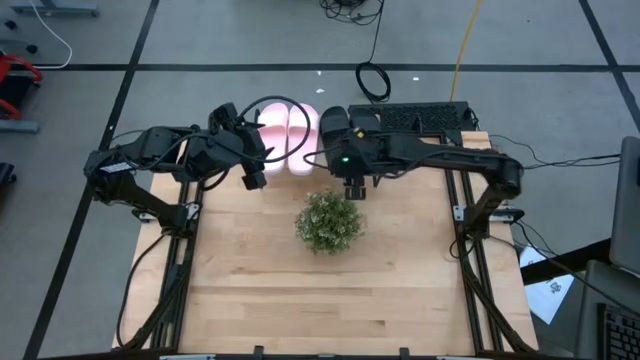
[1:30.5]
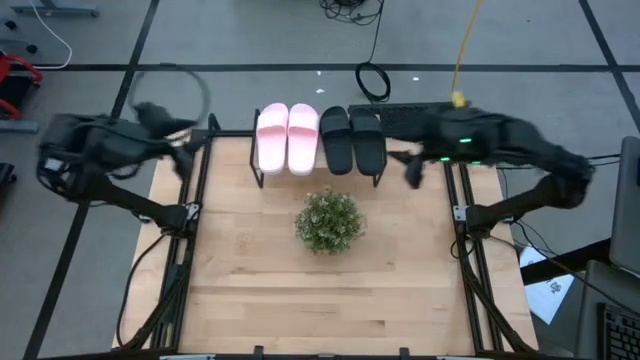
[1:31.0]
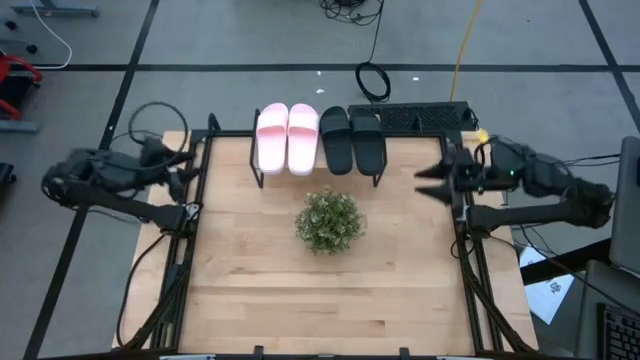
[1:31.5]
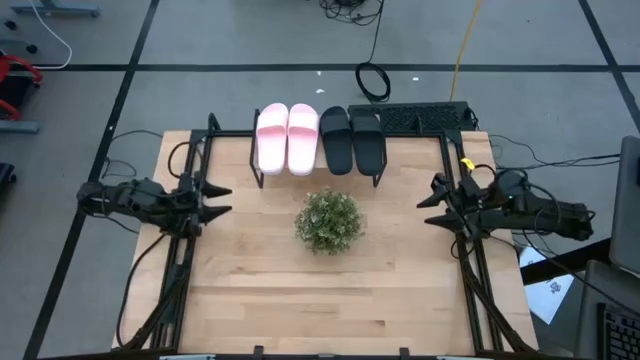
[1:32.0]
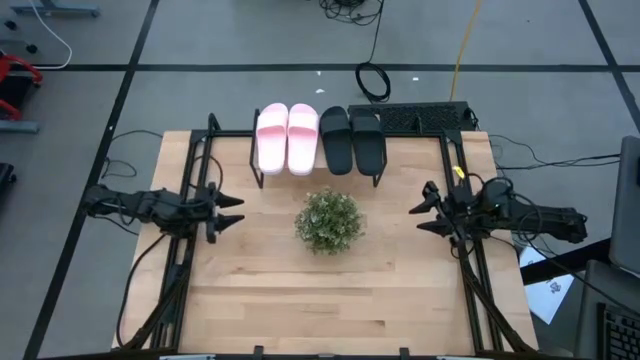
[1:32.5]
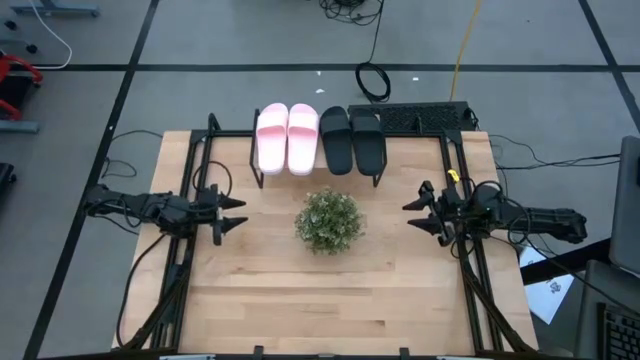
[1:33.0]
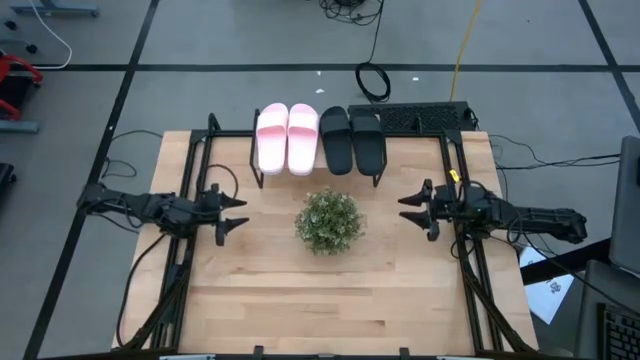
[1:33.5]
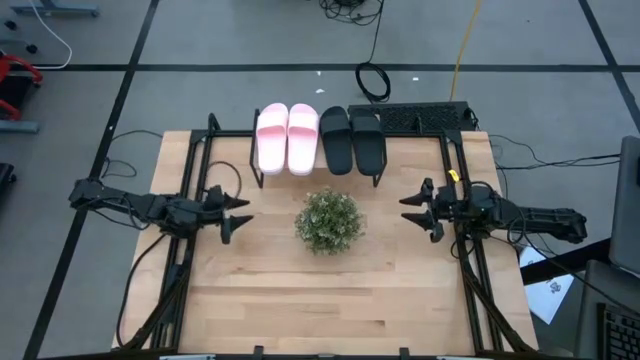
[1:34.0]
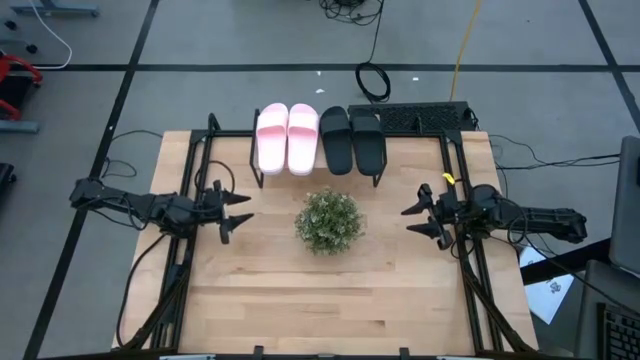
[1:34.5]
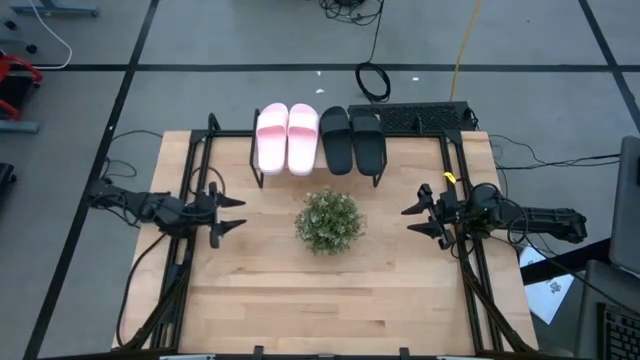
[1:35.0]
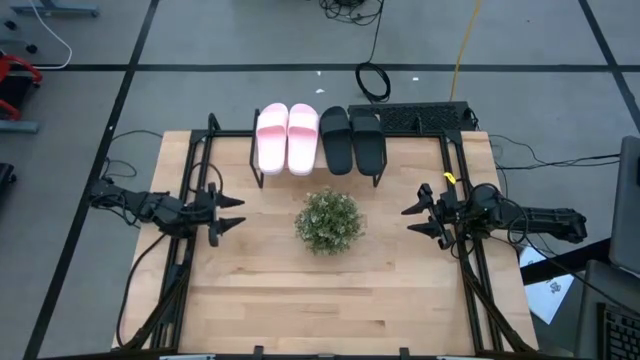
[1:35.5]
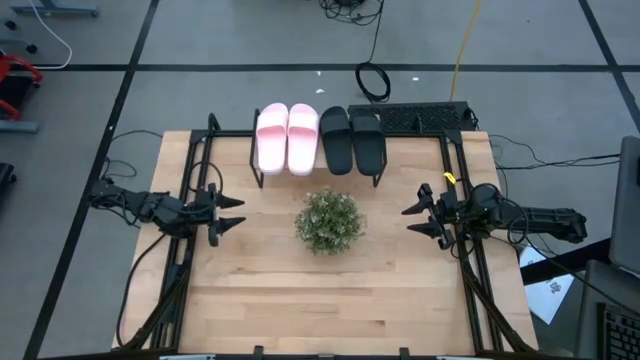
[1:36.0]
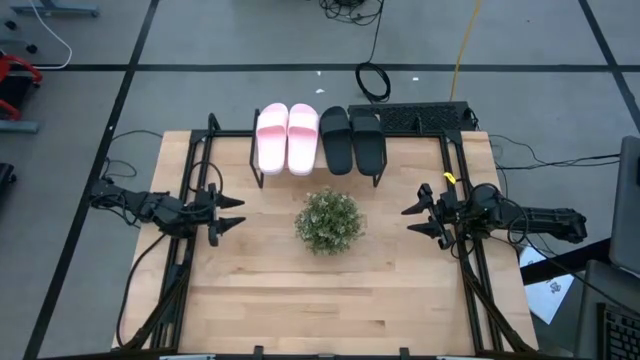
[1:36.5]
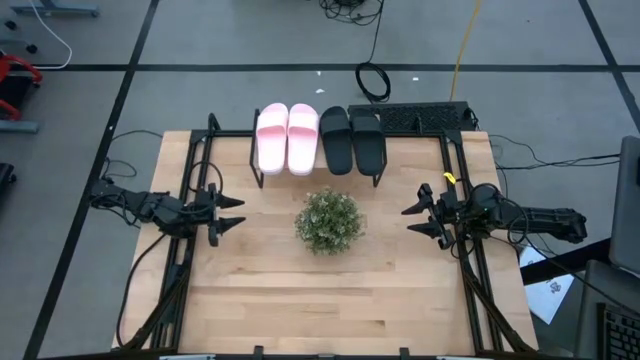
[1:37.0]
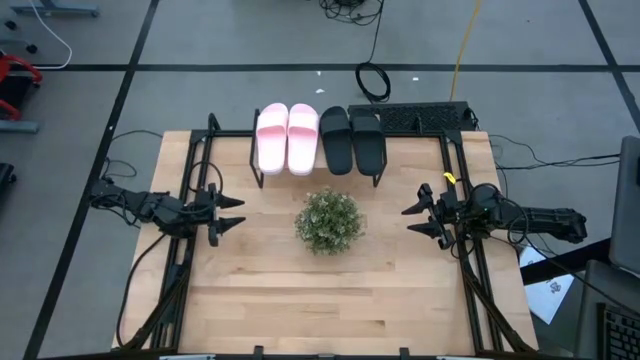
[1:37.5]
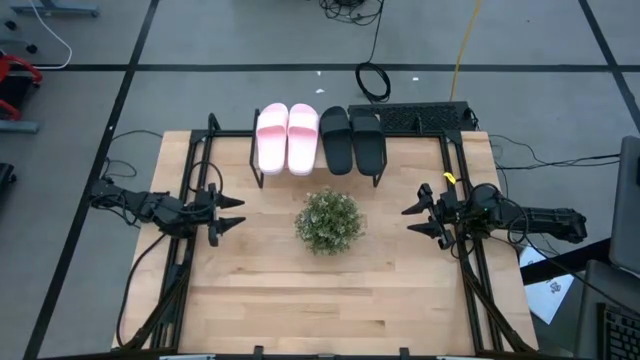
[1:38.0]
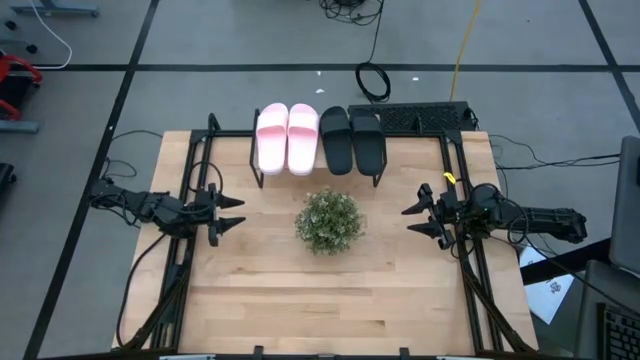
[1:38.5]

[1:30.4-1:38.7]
Task: Pick and place slides into the shelf
Return to Home Position

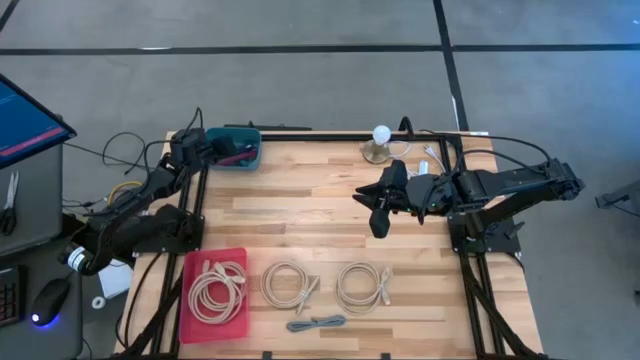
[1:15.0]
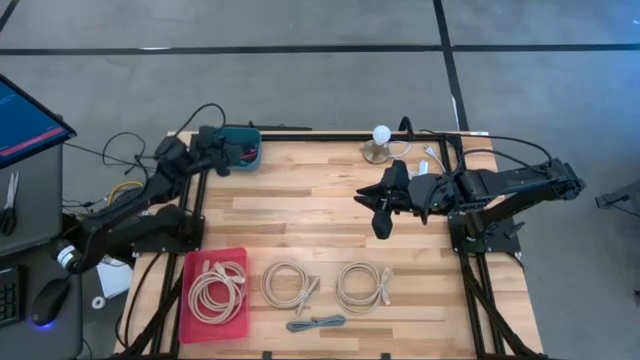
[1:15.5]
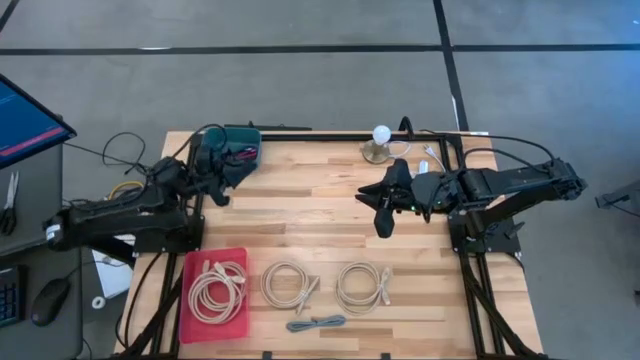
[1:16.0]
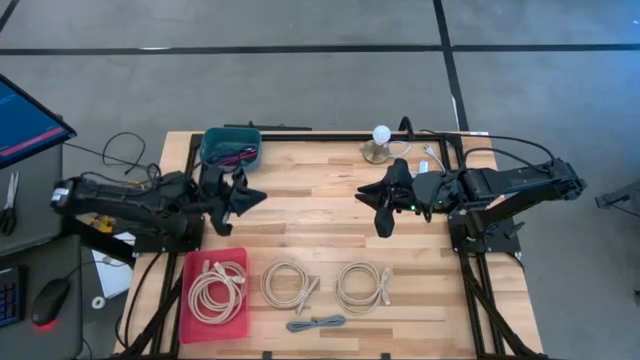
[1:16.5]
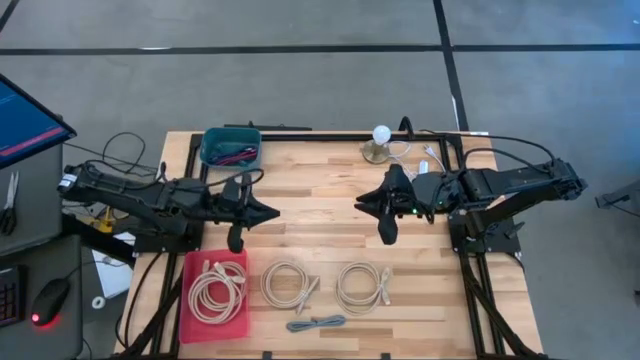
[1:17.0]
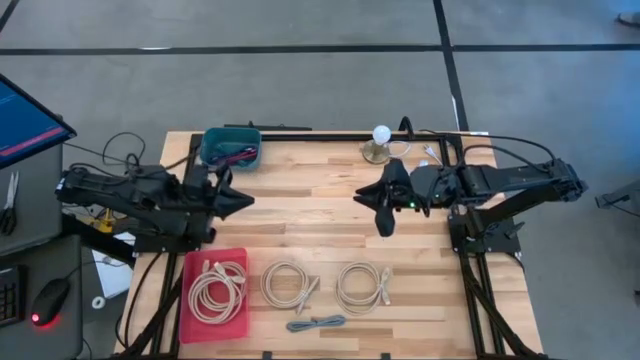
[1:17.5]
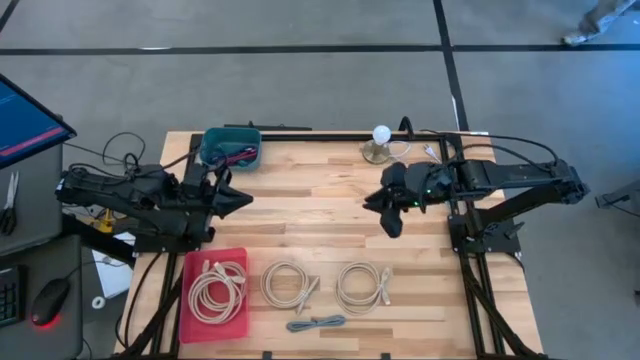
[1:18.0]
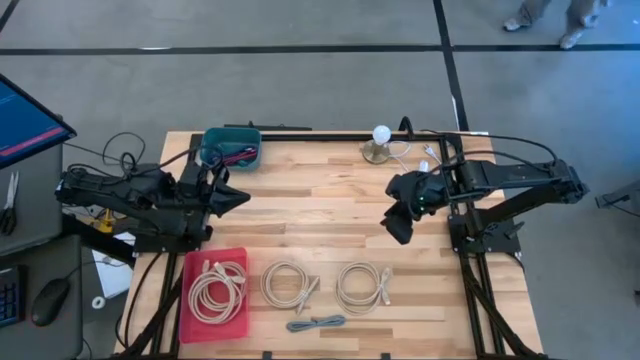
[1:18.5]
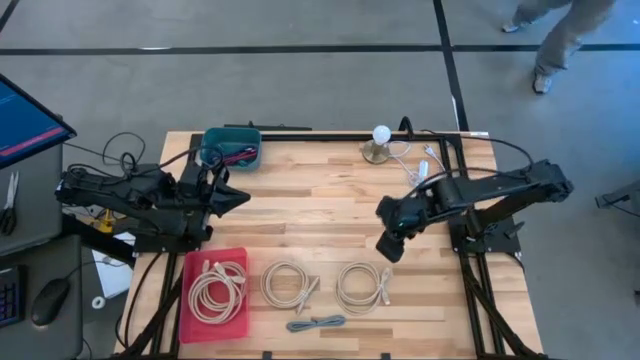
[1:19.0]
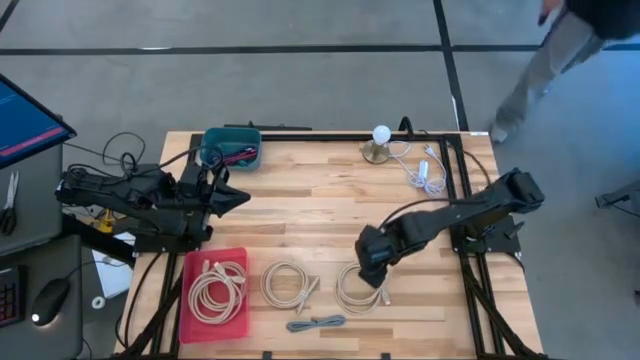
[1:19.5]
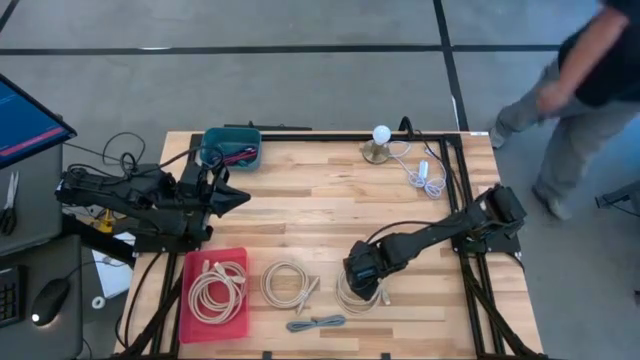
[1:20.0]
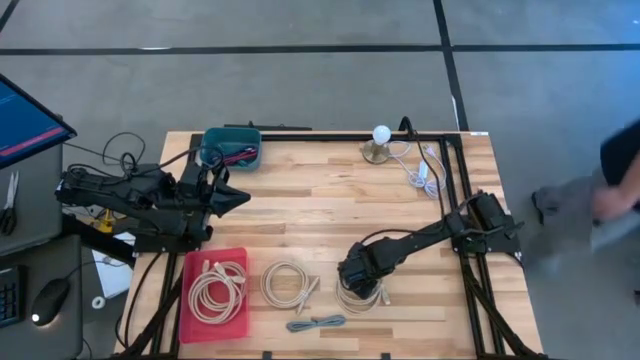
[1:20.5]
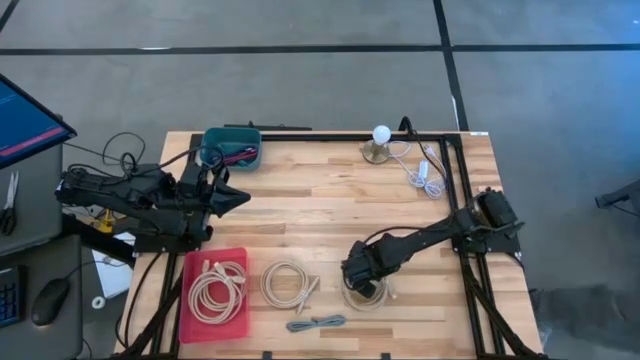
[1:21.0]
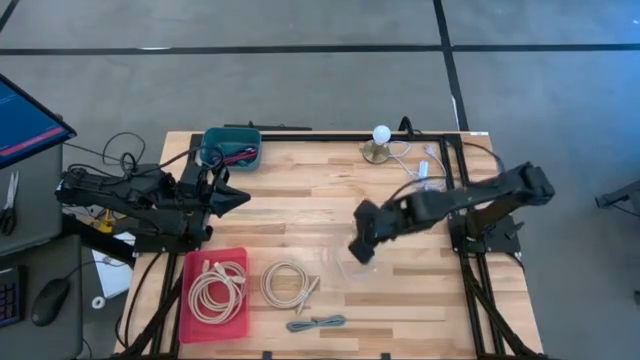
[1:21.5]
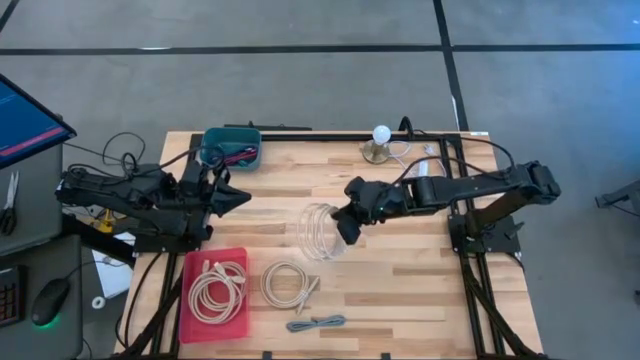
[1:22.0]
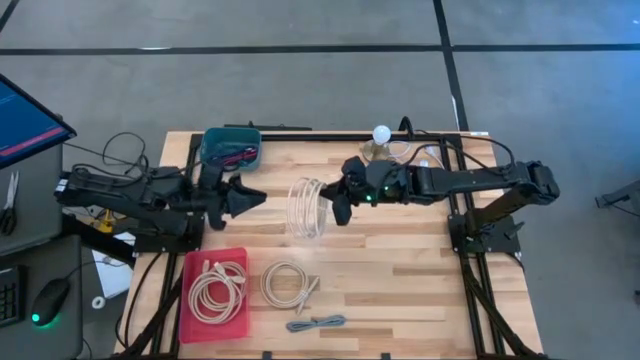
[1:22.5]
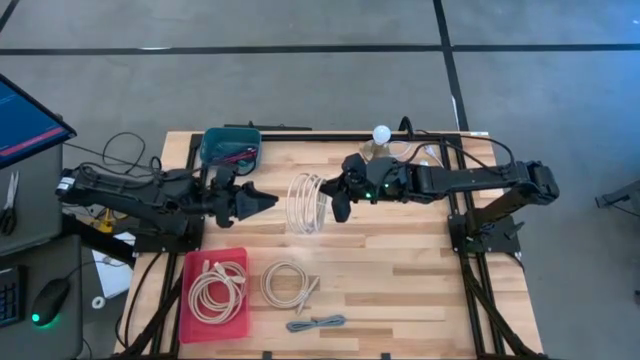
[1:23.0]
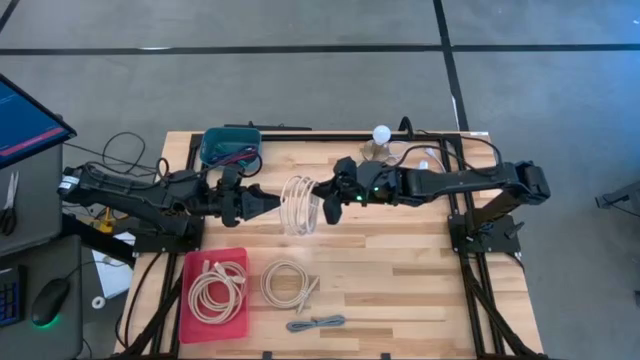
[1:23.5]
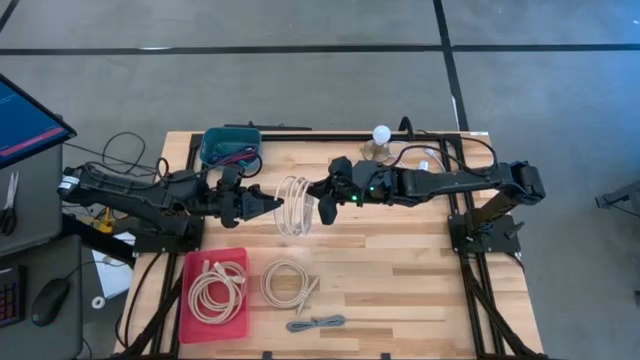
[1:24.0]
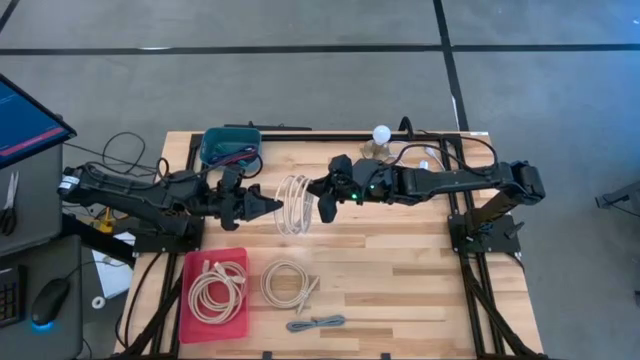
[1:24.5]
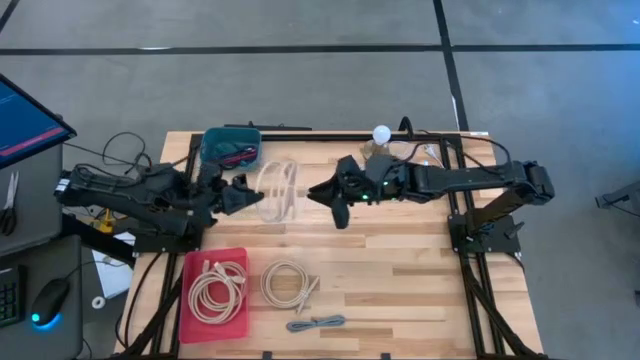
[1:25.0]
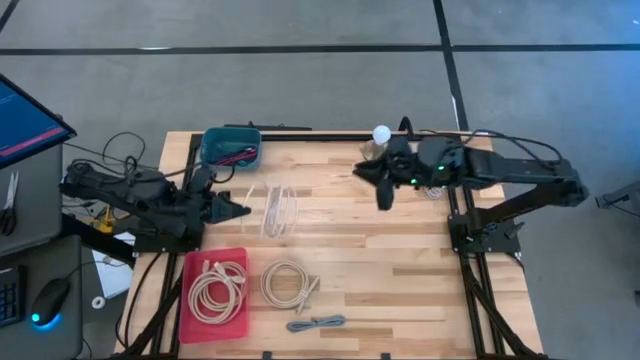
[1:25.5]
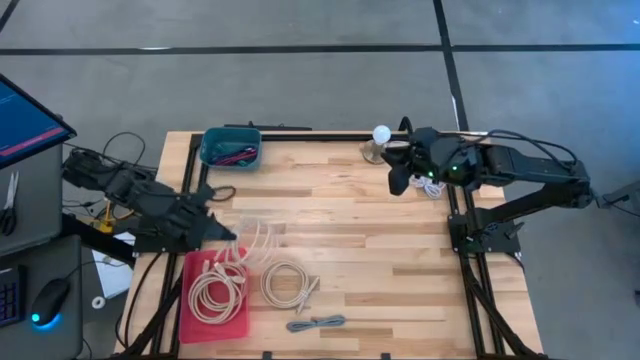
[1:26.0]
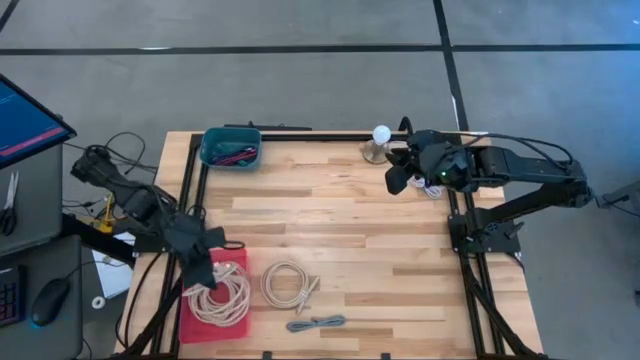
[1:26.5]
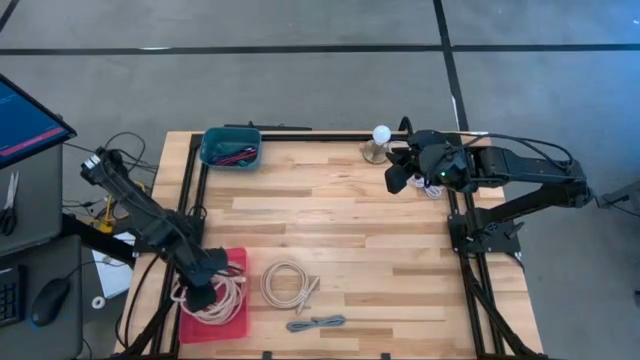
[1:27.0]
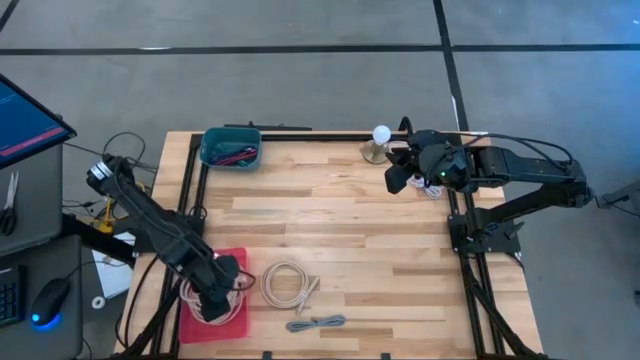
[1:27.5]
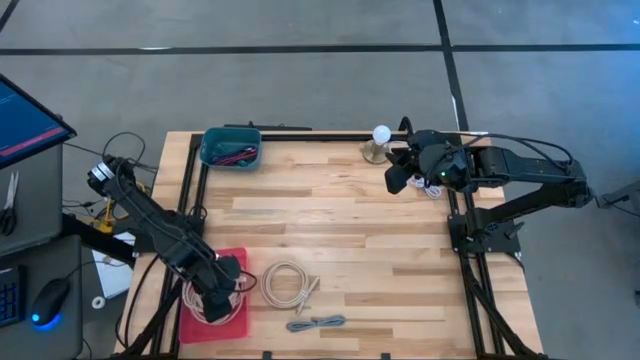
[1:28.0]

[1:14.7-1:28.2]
Task: Pick & Place USB Port
Put the brown HDMI cable into the red bin
